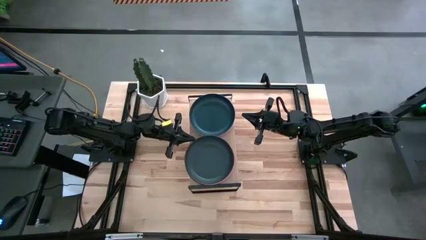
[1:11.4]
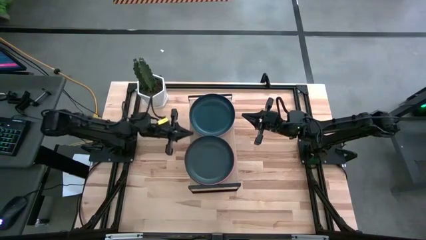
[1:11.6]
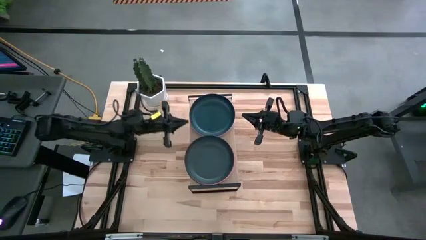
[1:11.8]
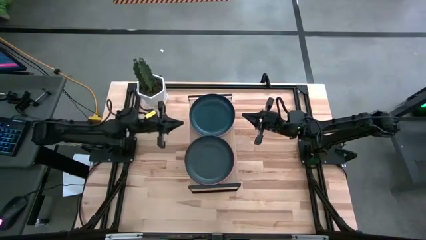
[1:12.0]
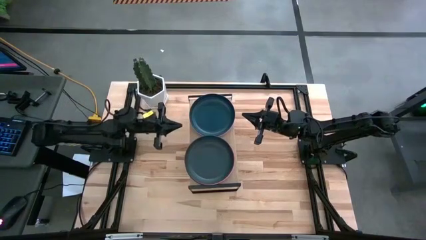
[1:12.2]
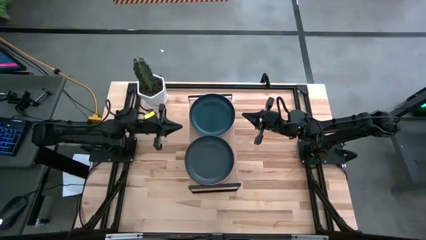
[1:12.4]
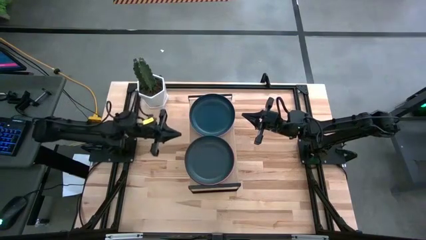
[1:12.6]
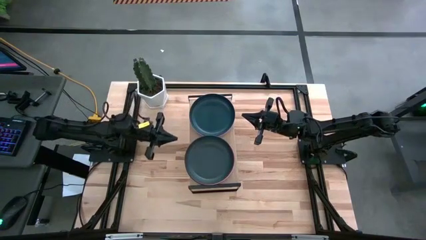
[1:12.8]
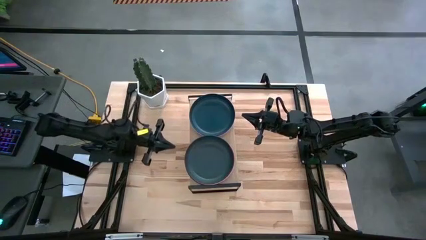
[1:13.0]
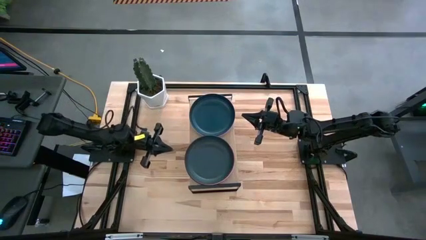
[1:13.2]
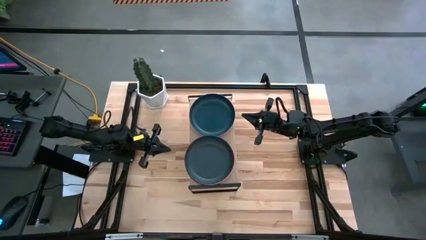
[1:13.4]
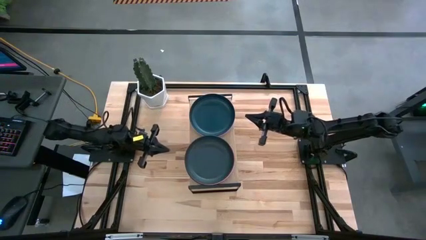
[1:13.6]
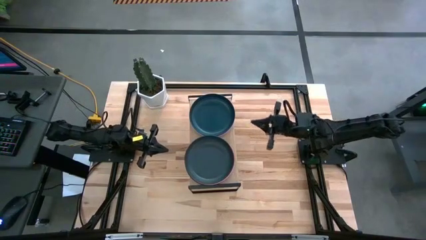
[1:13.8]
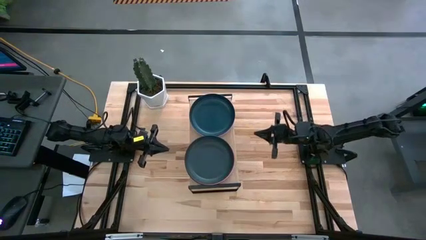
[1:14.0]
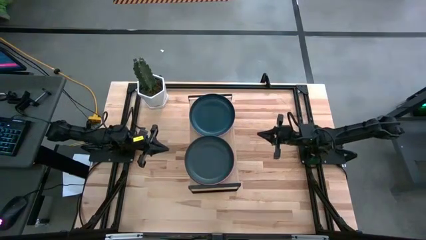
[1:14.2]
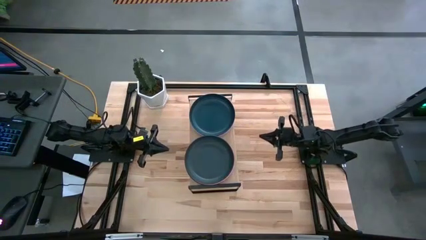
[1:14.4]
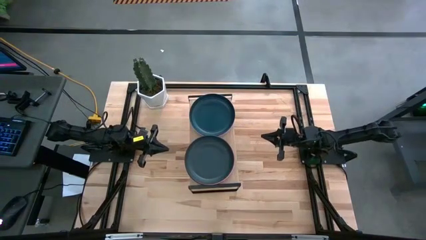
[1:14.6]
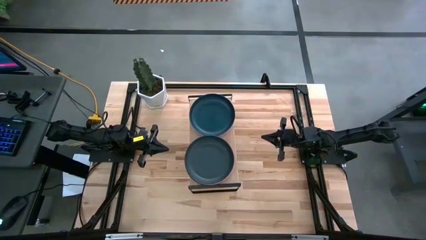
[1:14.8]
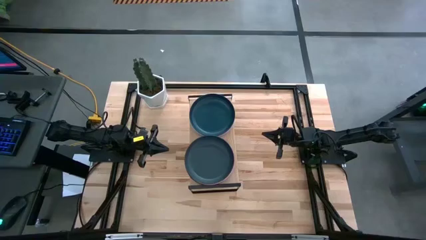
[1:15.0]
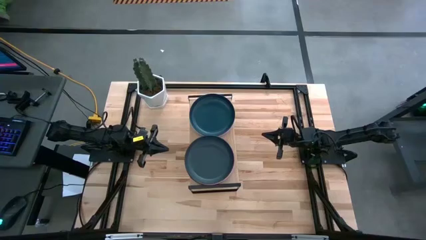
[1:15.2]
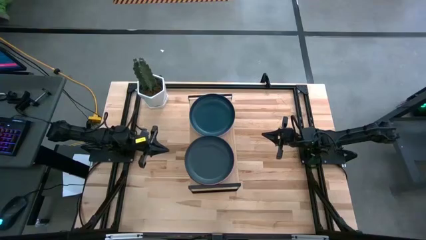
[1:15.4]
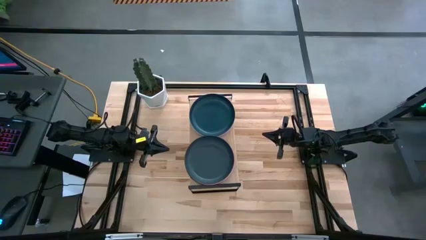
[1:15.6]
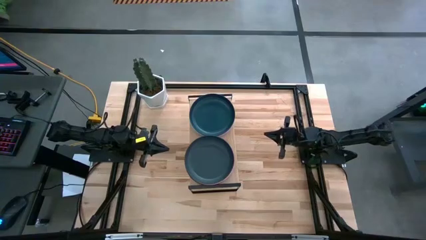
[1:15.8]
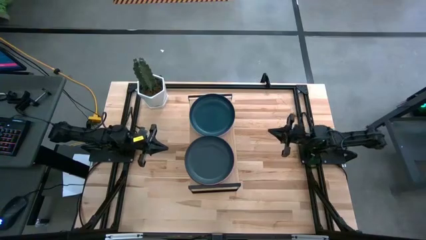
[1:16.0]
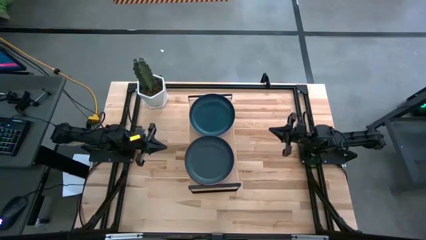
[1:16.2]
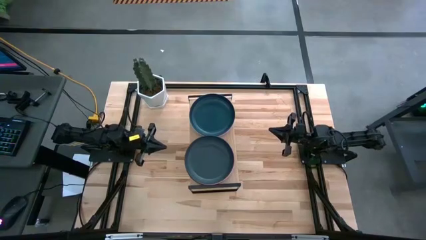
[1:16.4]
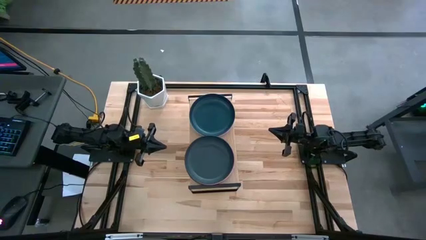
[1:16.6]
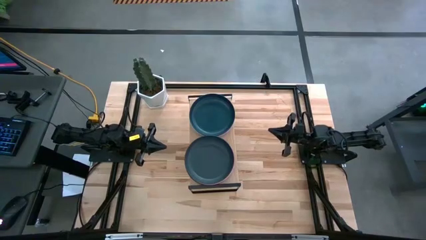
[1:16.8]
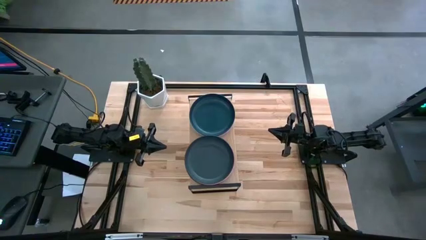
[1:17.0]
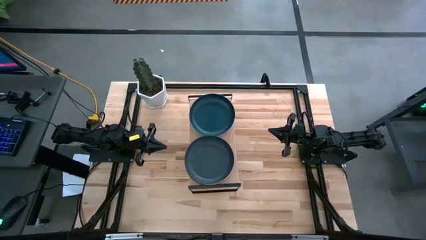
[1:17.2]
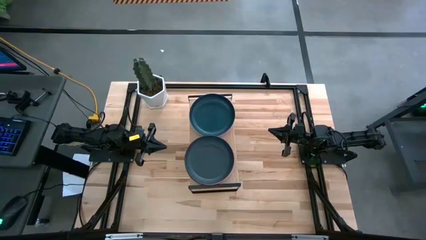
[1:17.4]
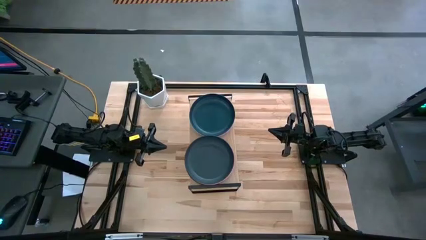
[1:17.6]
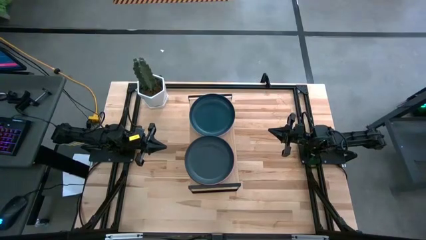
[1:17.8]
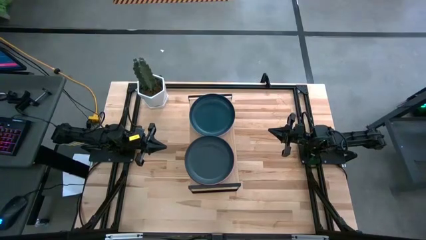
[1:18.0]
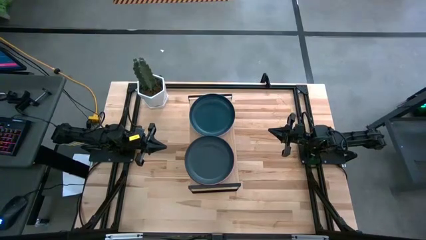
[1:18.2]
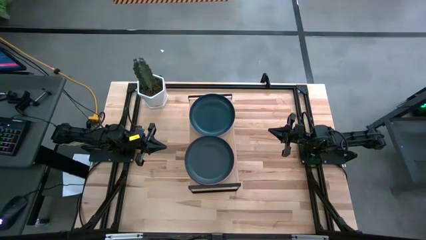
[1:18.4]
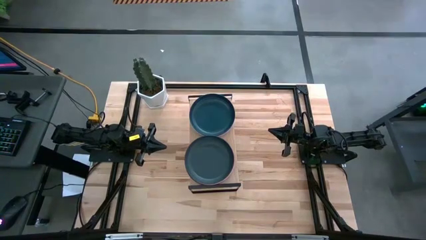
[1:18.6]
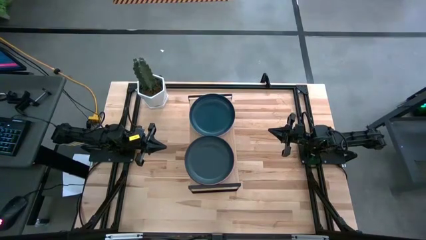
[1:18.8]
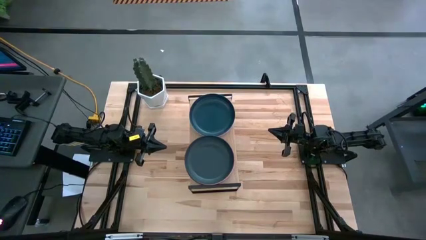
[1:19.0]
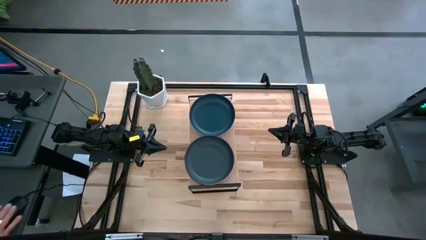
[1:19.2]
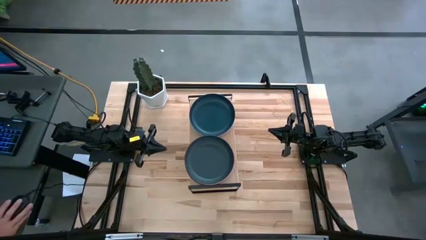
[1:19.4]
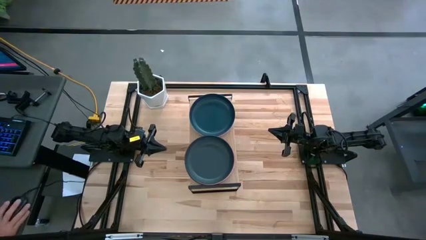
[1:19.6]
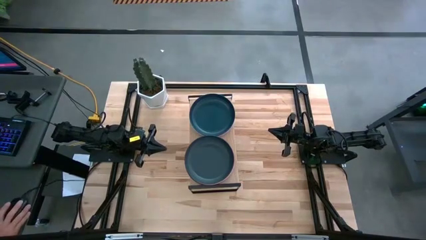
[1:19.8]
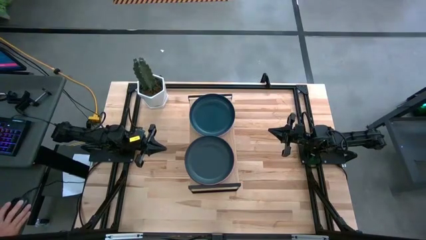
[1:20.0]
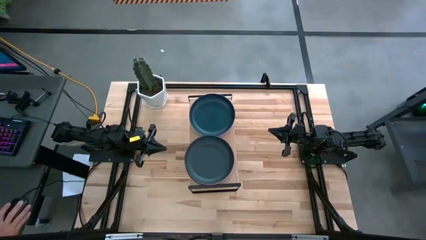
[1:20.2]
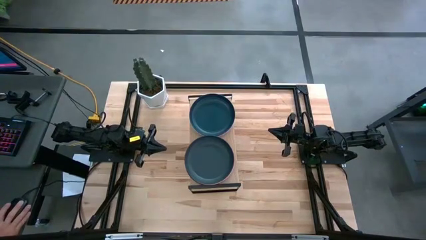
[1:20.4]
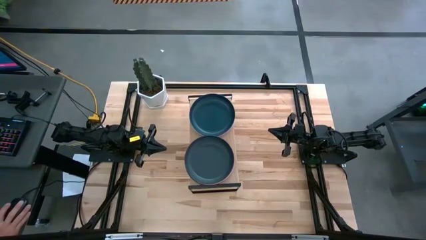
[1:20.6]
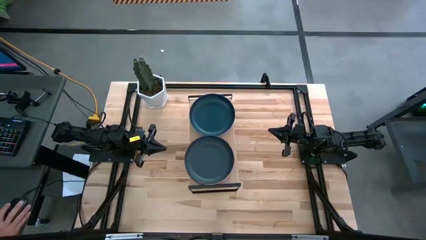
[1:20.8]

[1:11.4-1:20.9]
Task: Place and stack plates onto a shelf
Return to Home Position
